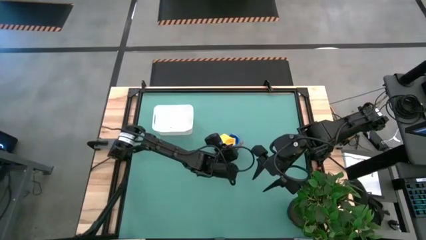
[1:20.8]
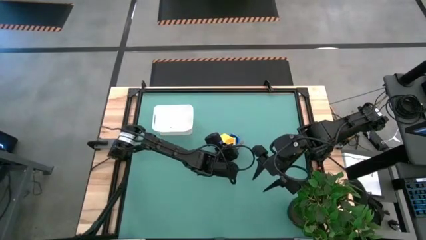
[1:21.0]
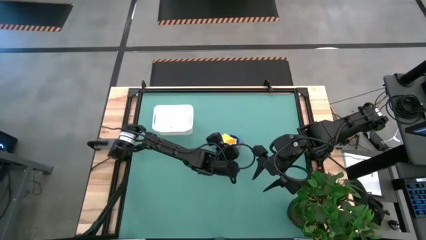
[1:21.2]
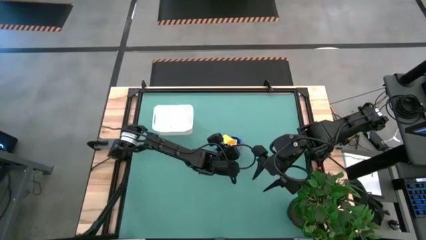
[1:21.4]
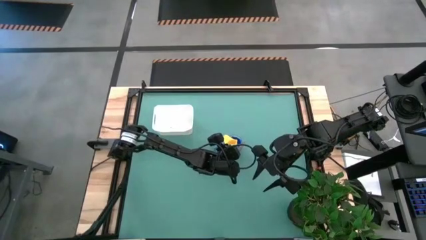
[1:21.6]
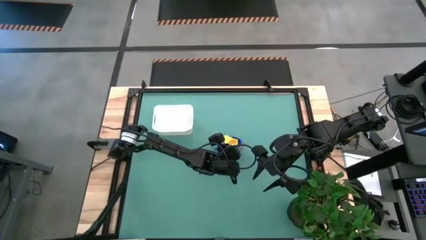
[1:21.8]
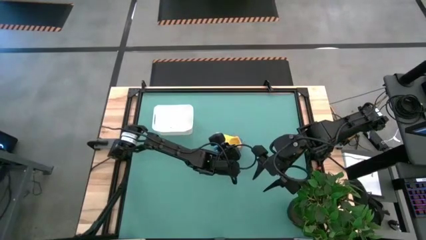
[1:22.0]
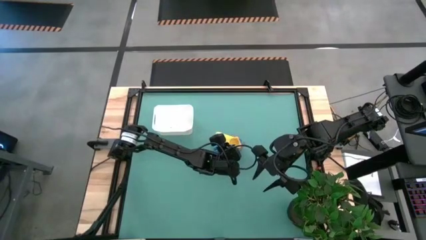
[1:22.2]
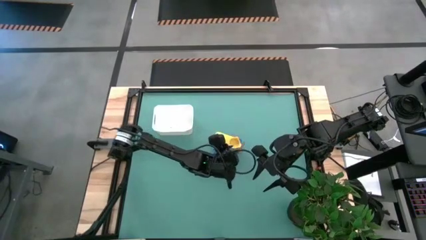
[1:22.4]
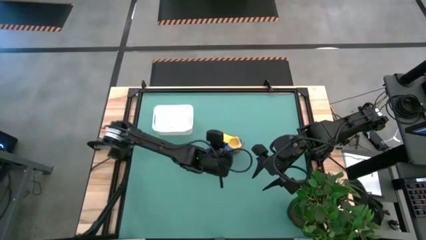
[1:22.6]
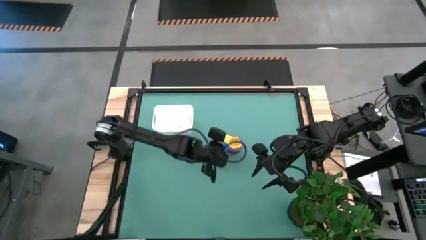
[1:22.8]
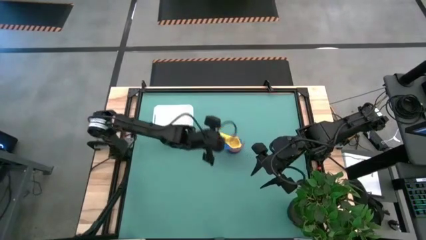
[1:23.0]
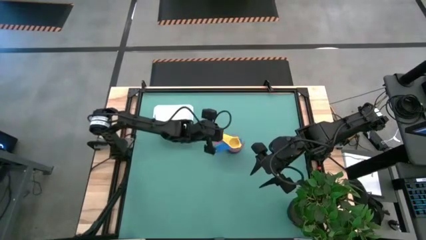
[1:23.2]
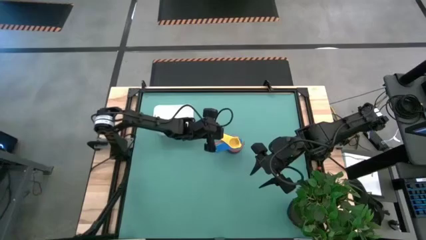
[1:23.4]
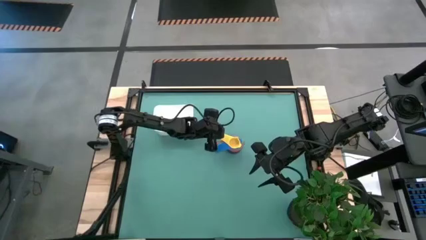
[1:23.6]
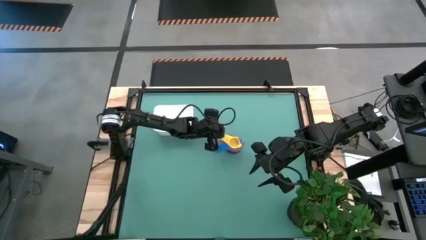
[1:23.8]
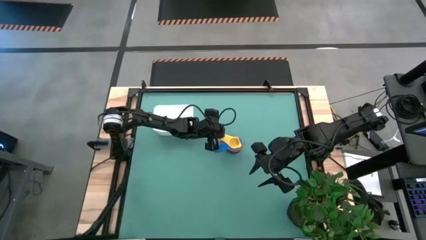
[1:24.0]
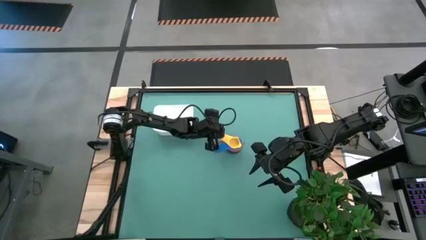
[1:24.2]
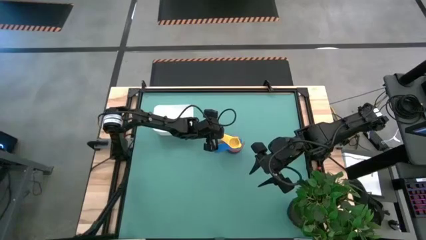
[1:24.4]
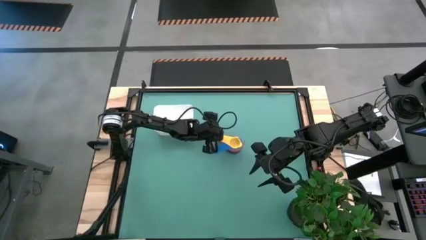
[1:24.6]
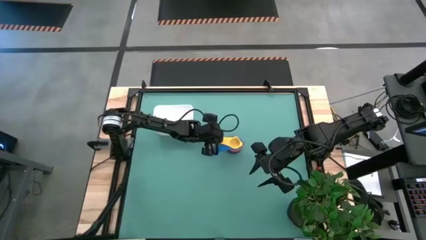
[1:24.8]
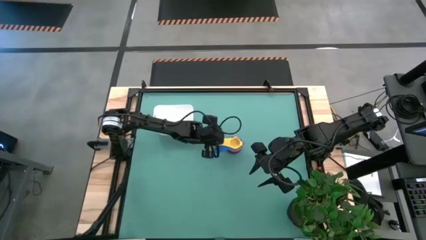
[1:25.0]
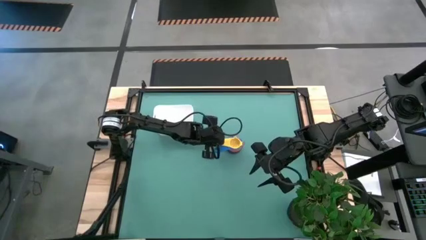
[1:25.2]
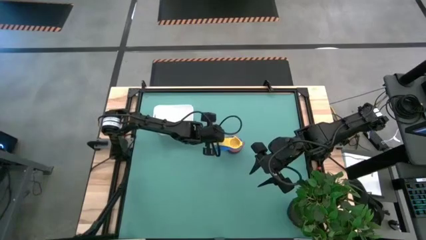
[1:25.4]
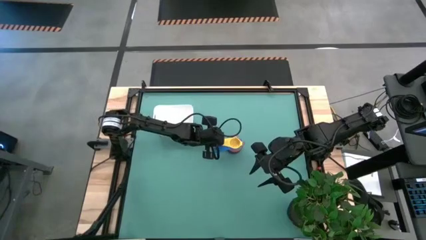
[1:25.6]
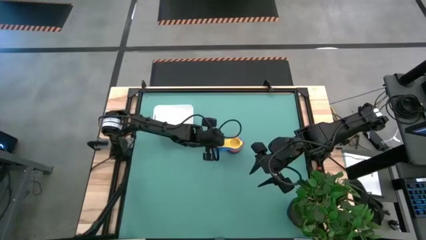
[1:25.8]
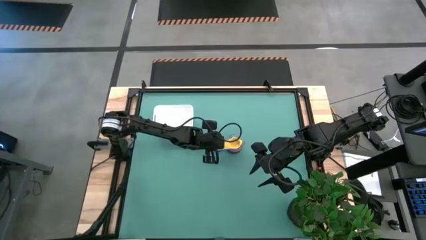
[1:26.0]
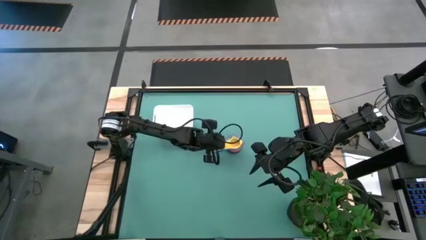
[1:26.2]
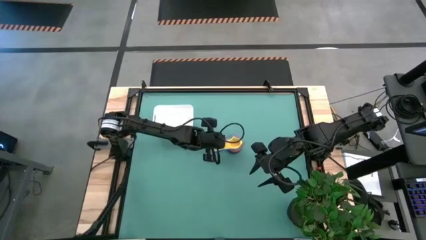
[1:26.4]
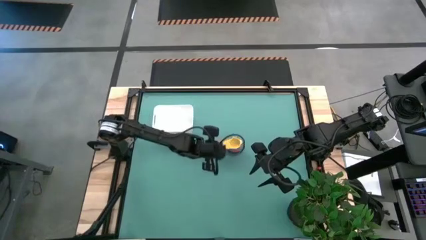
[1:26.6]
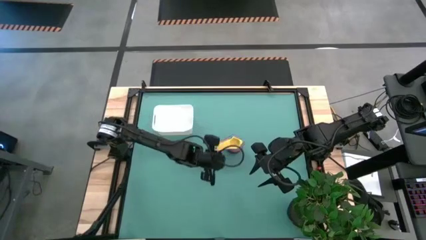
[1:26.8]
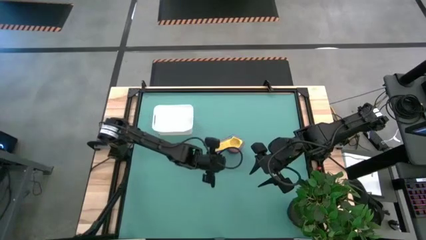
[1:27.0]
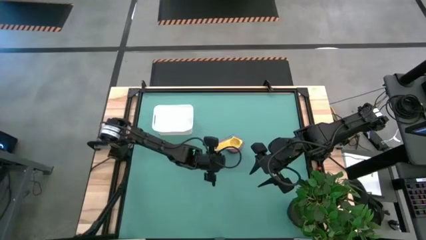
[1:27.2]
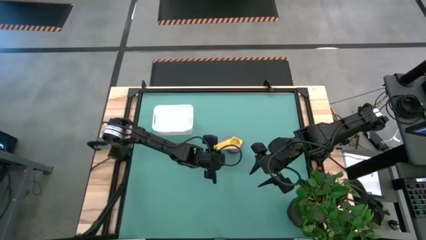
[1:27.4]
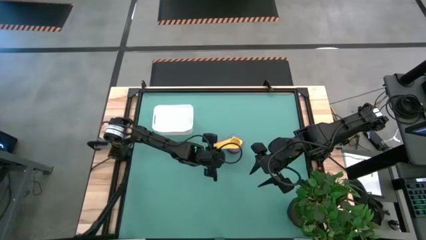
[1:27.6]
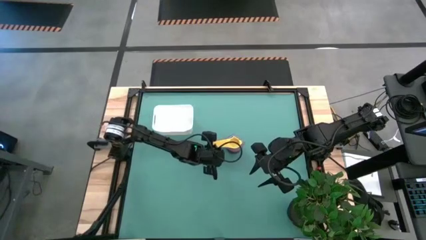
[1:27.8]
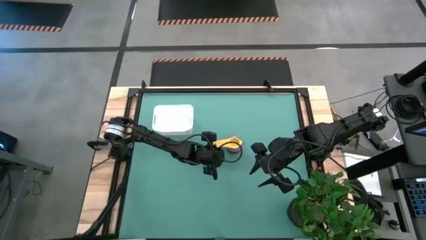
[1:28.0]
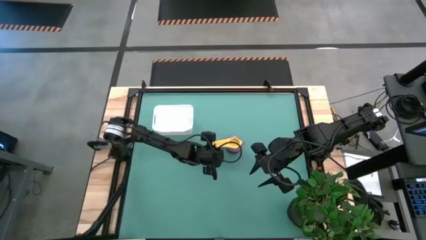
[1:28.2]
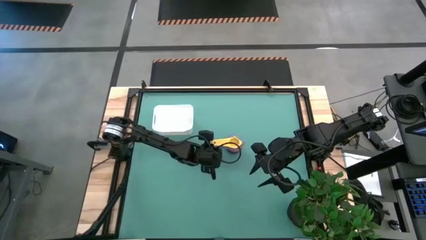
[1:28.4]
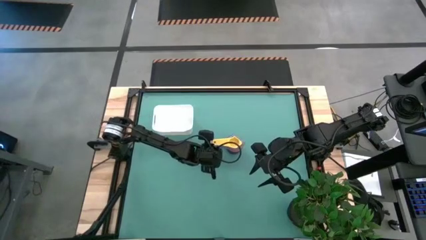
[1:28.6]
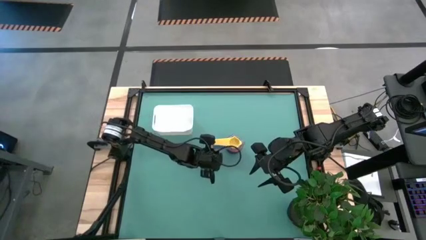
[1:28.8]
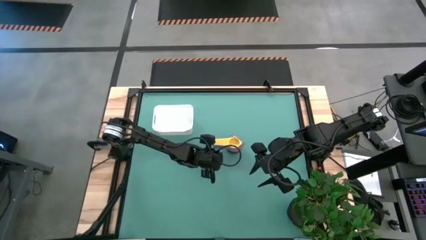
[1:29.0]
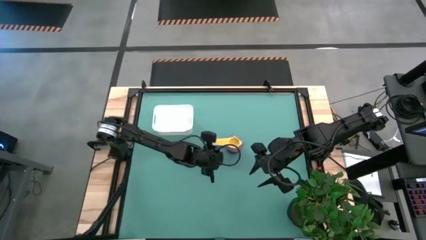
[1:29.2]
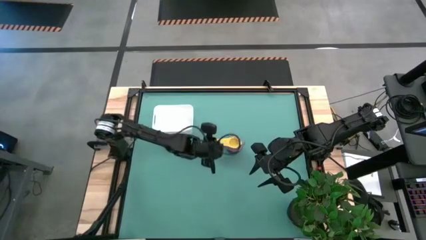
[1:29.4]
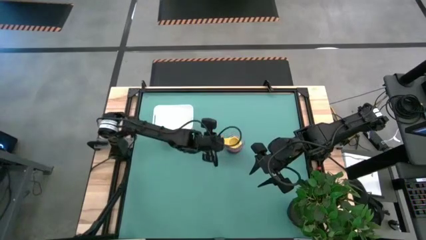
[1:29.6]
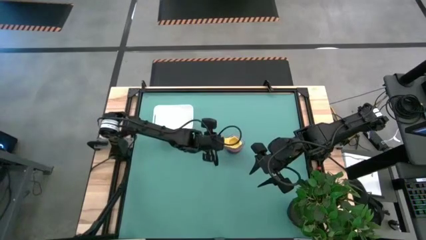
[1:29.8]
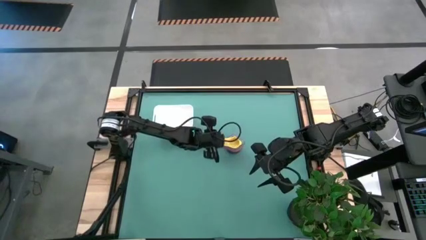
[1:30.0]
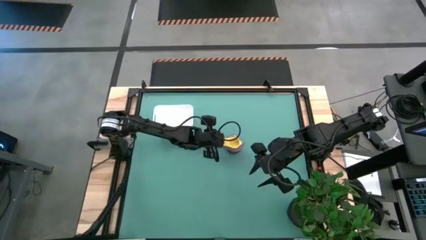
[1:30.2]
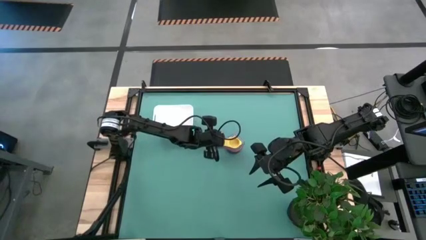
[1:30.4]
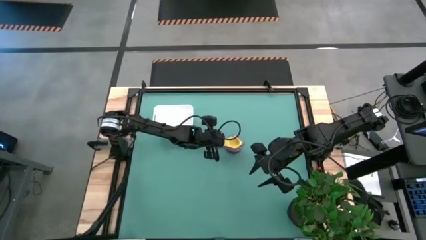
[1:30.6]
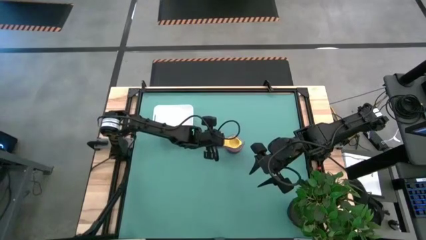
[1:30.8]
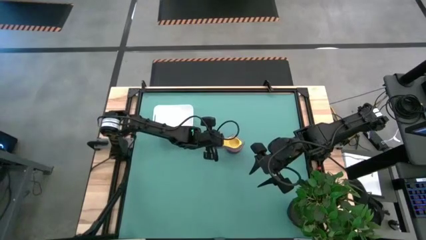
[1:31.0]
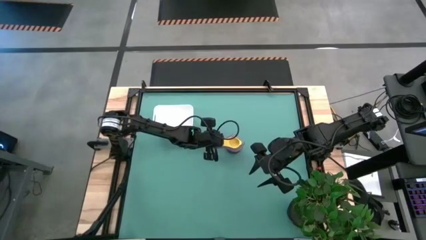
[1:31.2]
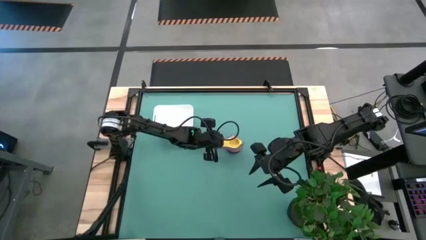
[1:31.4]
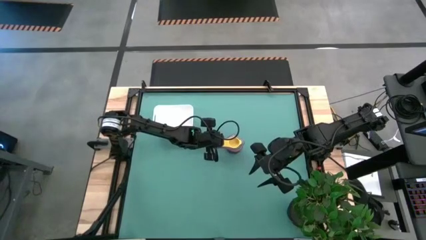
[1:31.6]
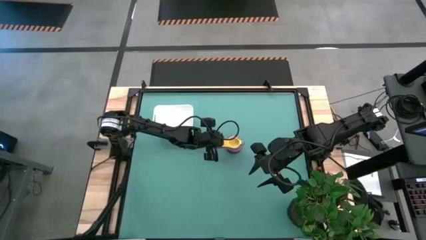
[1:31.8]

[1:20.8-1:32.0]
Task: Nest measuring cups in basket
Stack the yellow measuring cup on top of the blue measuring cup

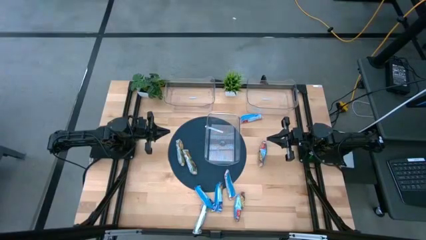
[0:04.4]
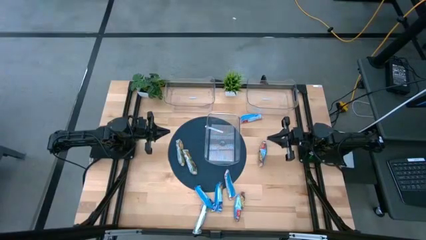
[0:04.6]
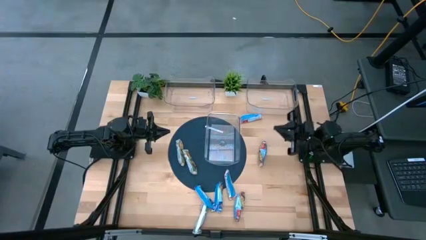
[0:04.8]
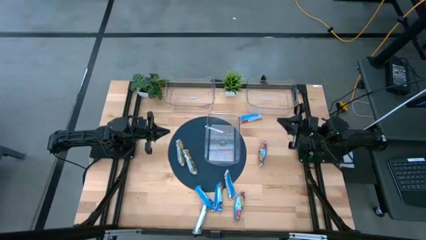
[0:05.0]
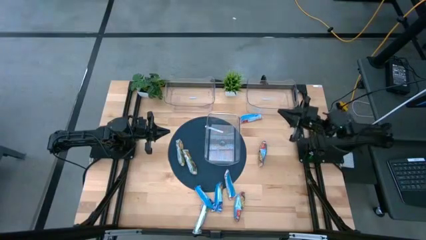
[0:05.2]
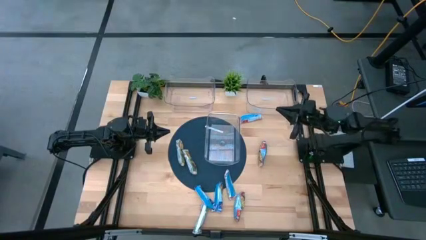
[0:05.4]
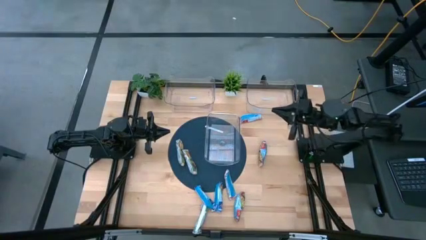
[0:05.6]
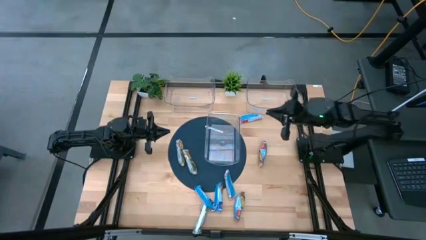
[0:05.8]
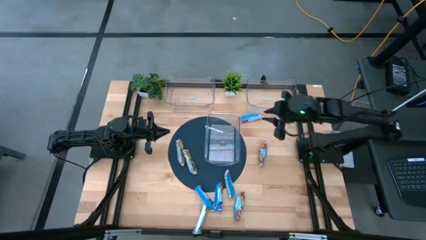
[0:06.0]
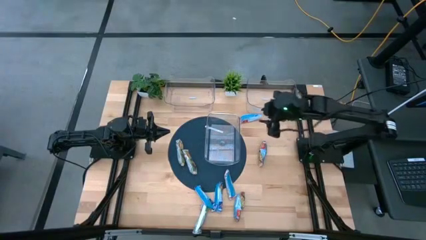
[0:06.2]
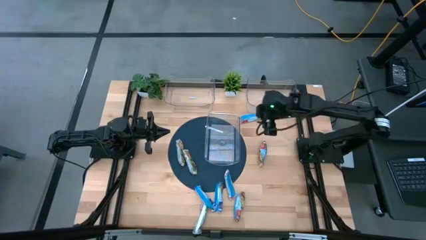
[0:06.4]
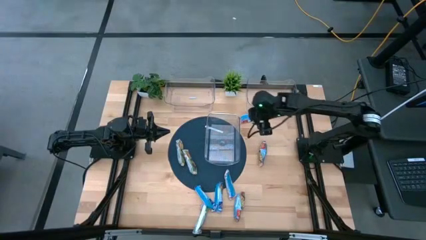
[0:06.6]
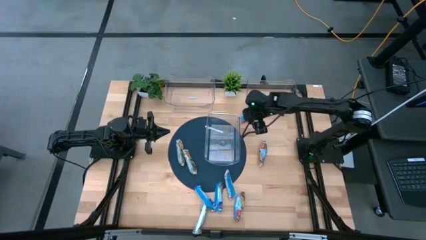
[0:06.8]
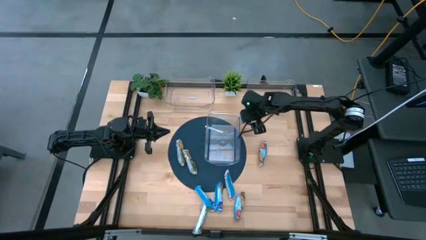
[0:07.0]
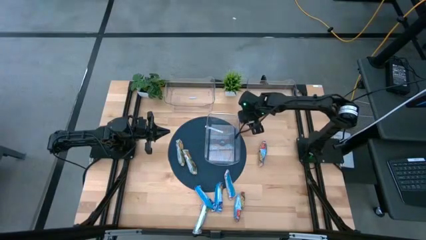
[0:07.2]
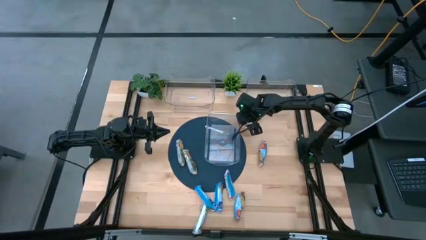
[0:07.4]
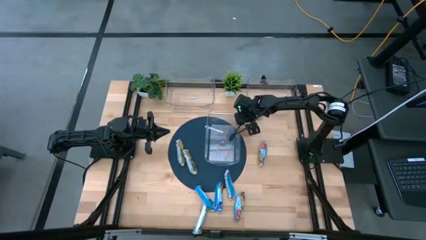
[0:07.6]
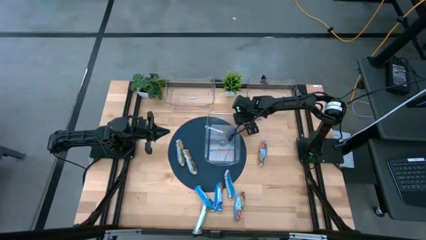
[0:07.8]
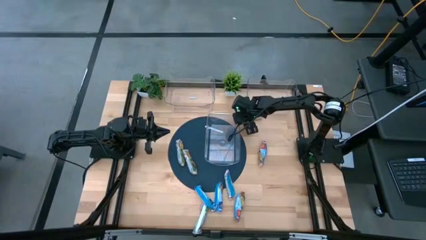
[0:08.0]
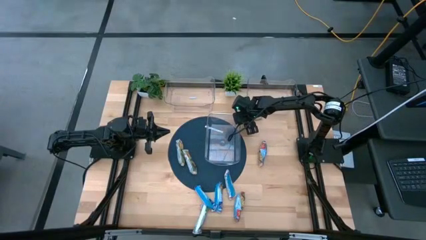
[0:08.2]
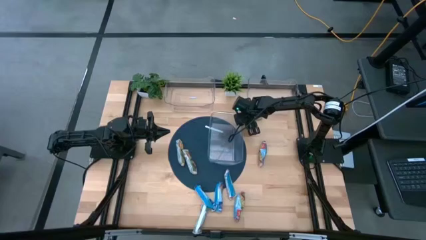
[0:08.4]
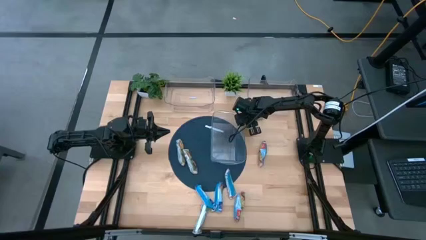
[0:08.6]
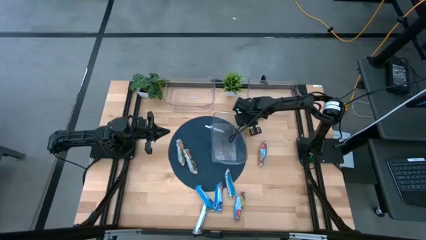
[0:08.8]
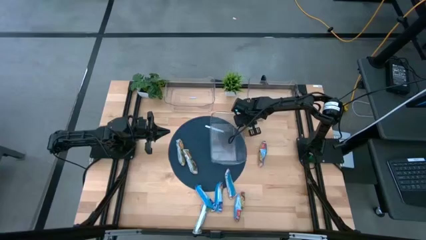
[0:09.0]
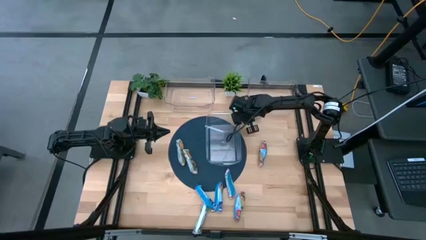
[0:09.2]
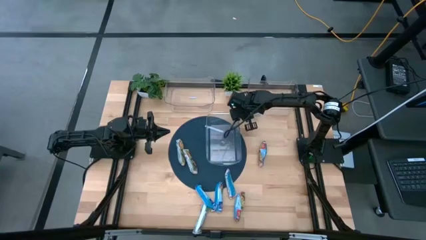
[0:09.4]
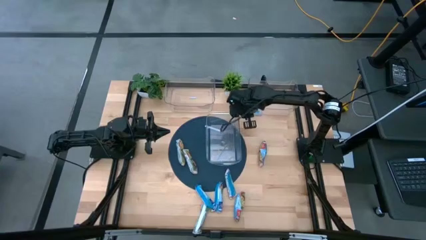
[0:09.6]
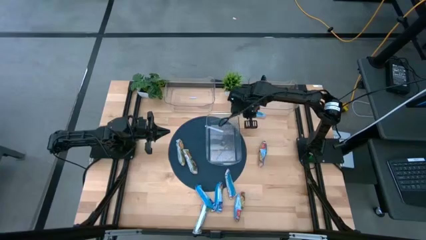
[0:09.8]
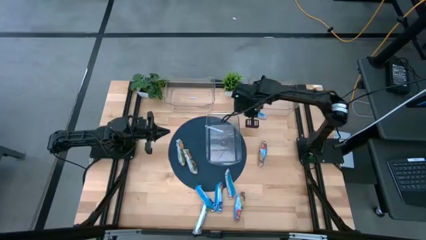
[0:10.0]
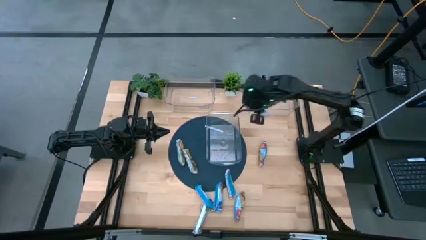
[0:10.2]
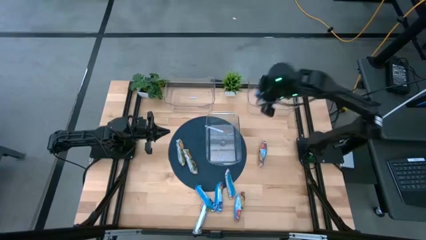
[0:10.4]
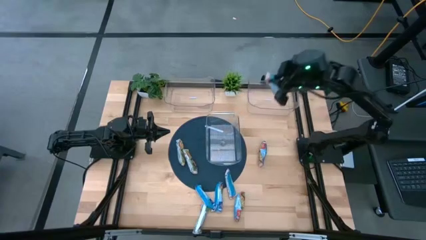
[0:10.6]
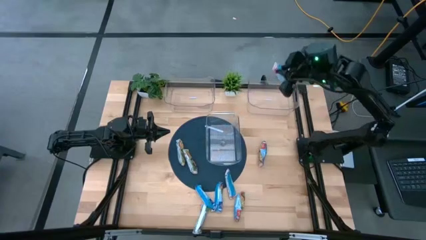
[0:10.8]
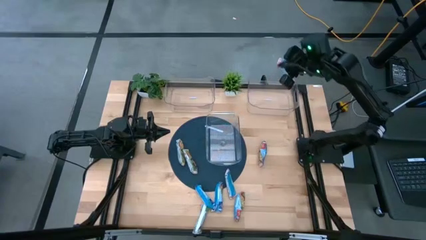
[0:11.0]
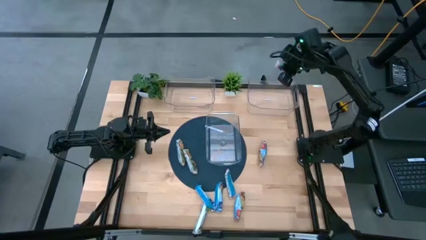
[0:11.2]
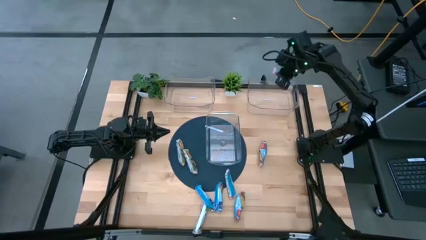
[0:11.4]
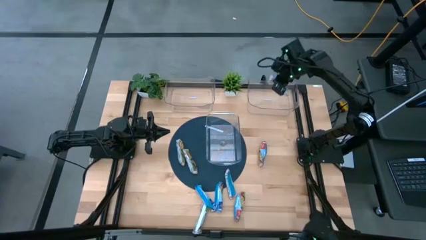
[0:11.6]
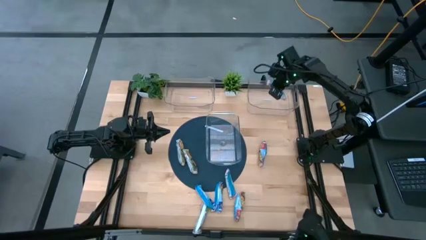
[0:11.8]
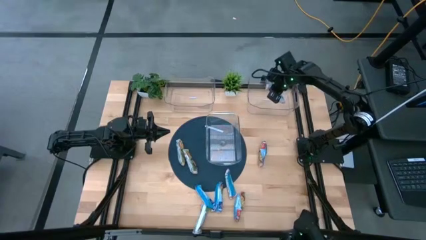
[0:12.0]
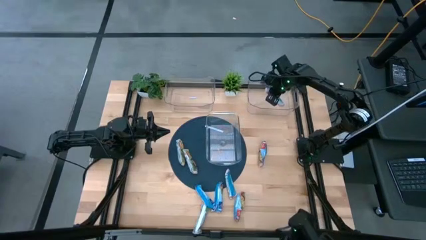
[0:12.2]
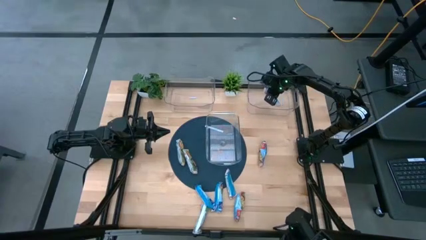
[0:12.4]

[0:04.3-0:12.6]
Task: Pick and place Granola Bars by type
Put the red granola bar into the top right transparent bin
